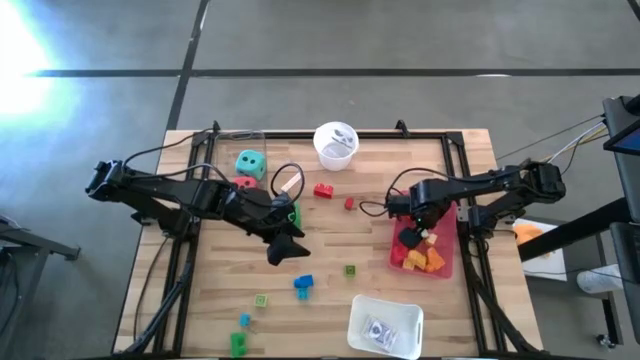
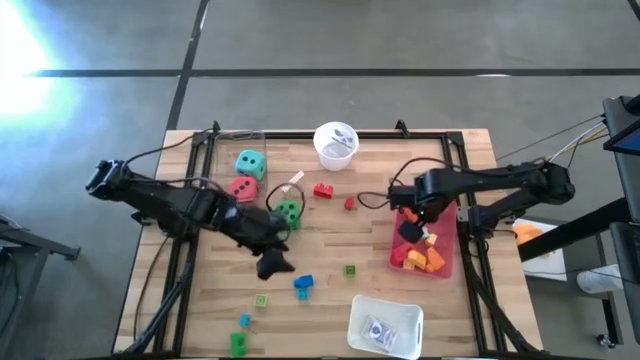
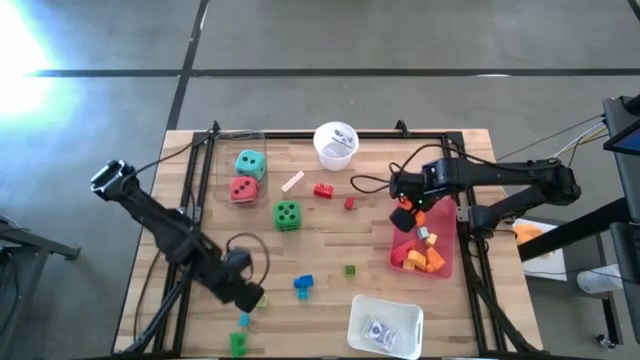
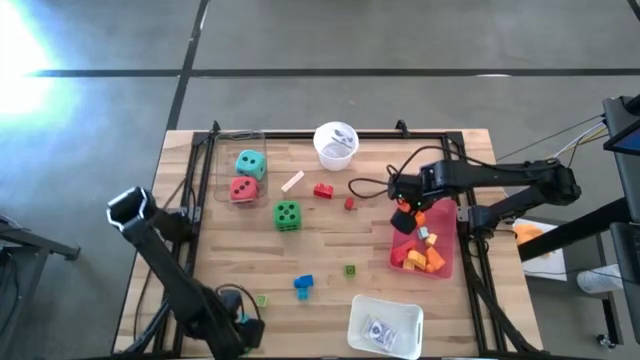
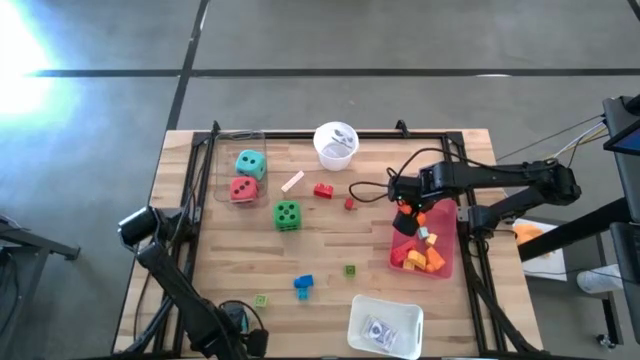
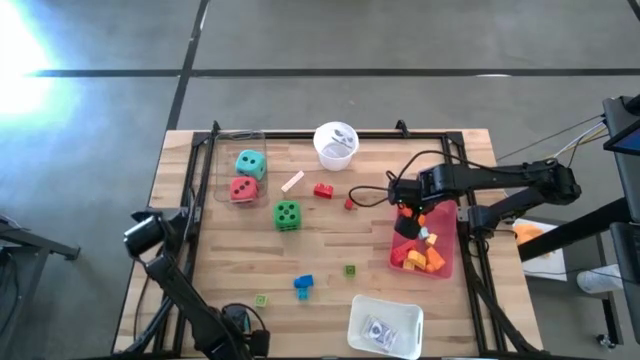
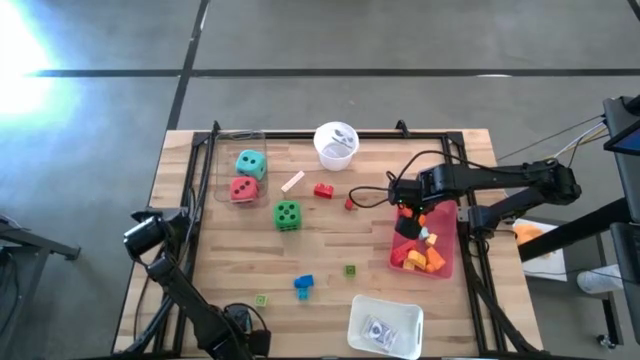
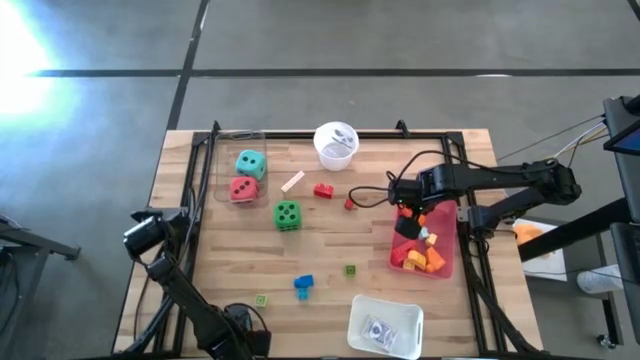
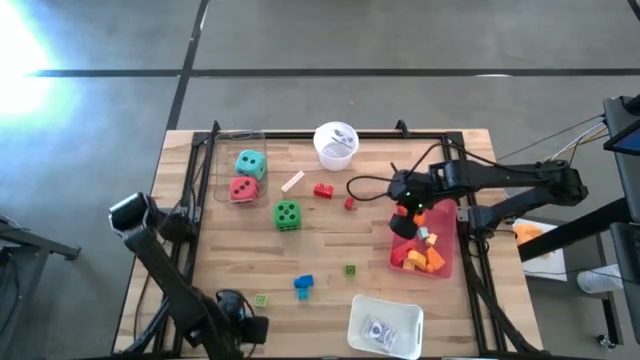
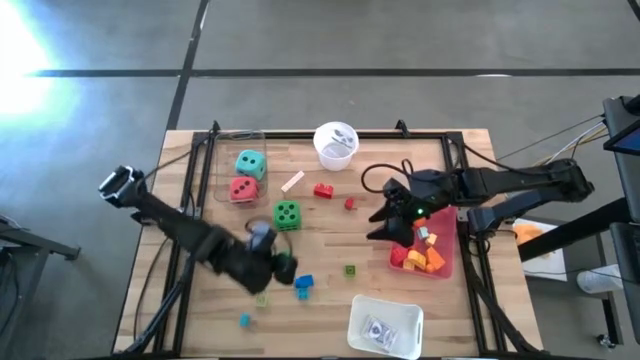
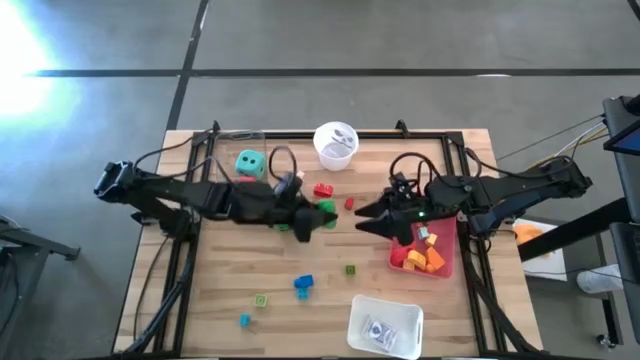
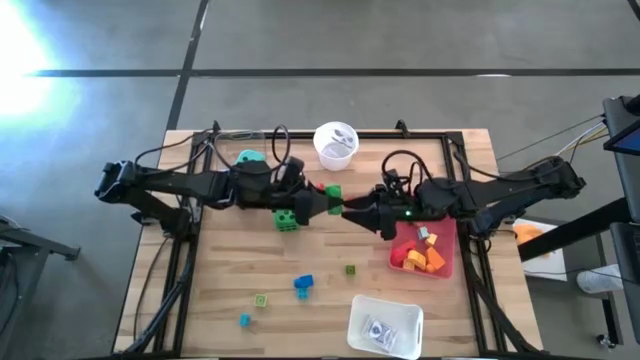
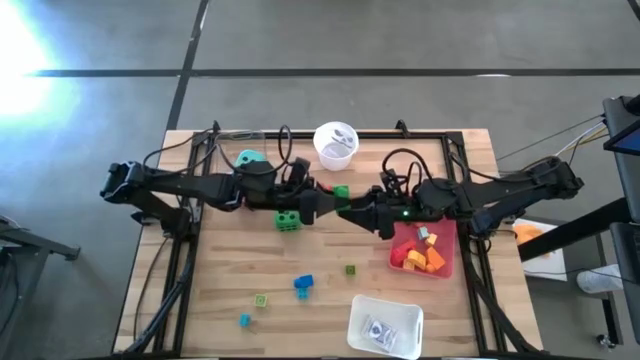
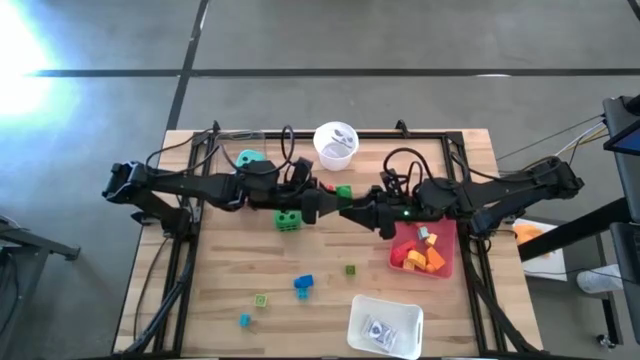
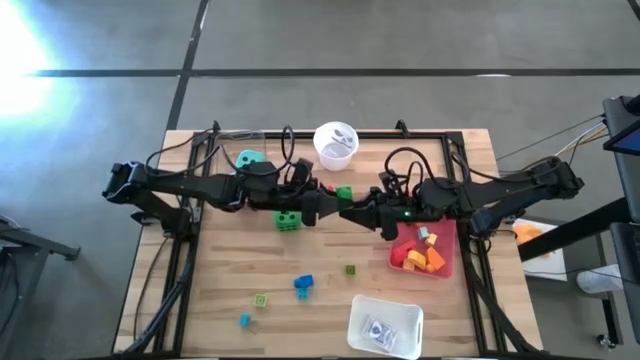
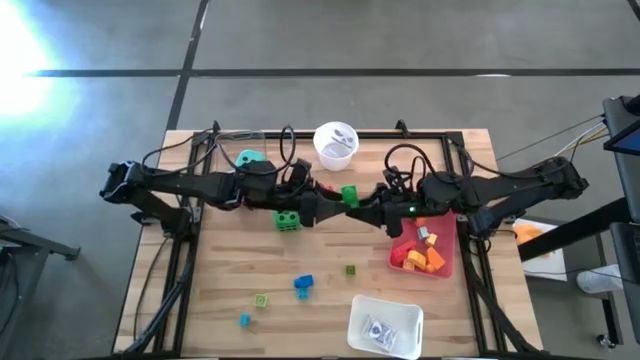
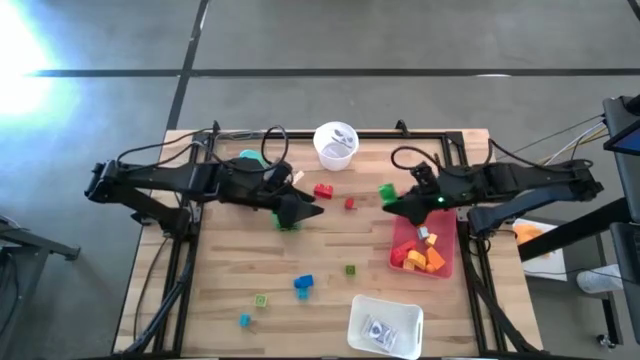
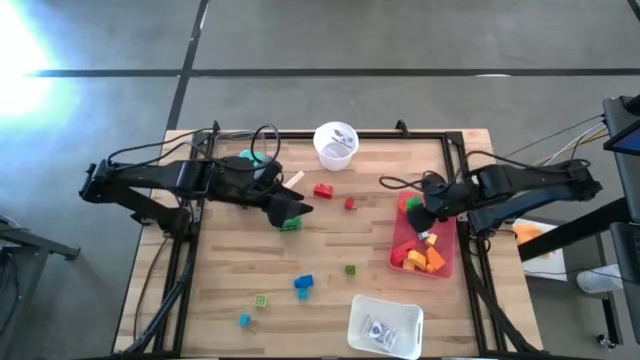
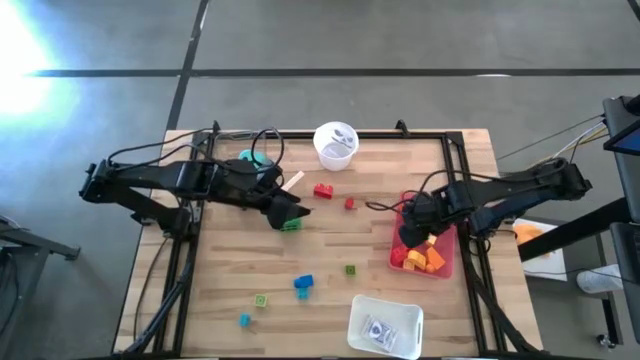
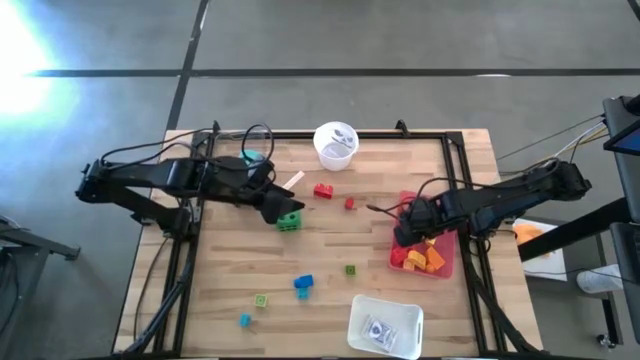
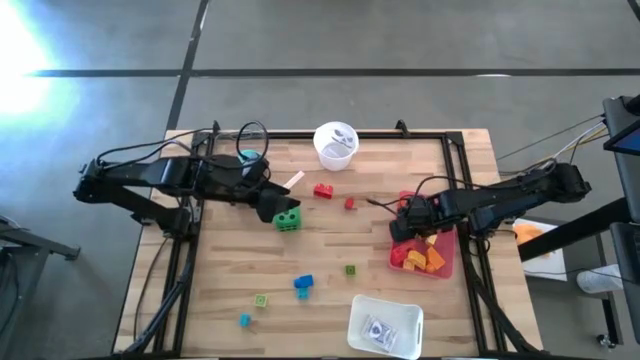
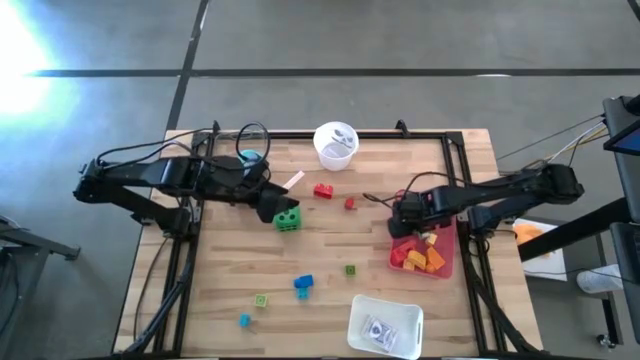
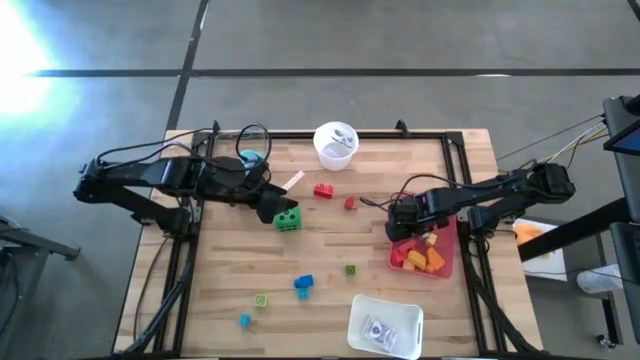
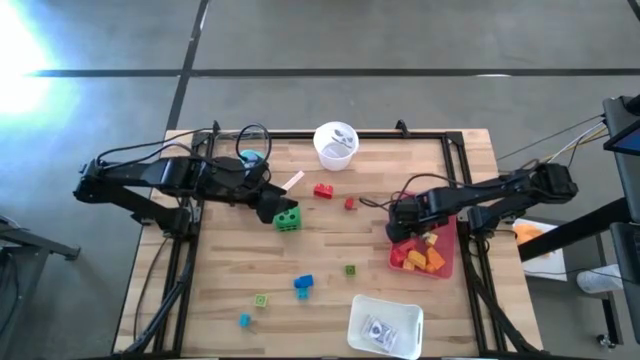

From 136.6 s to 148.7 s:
Task: Pick & Place Toys
Put the green game piece into the pink bin

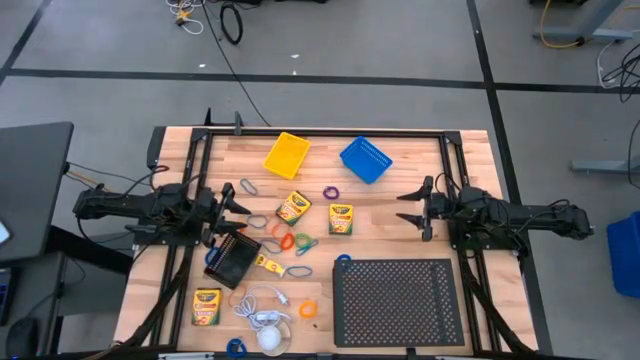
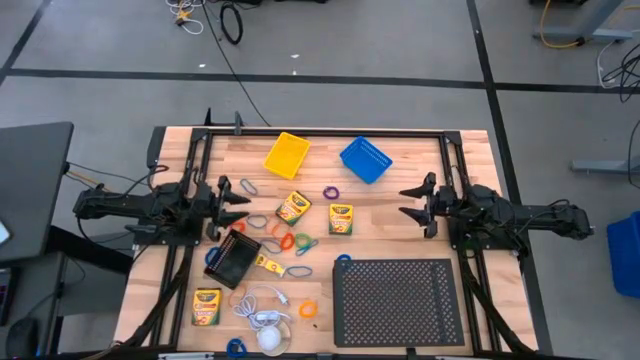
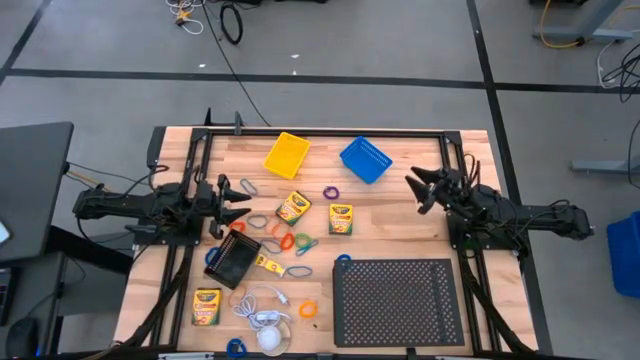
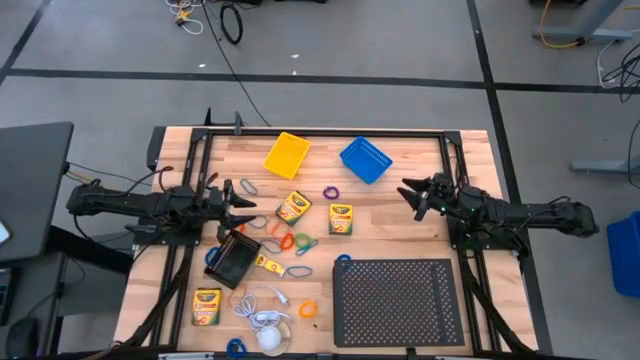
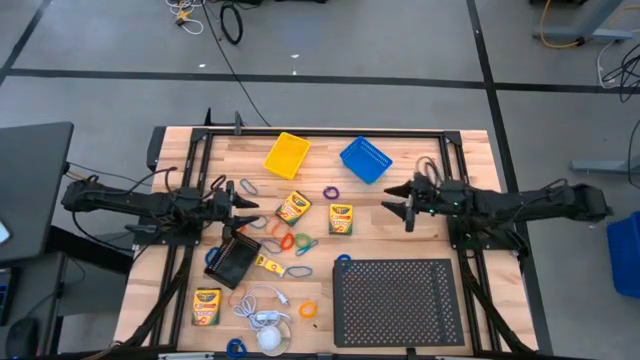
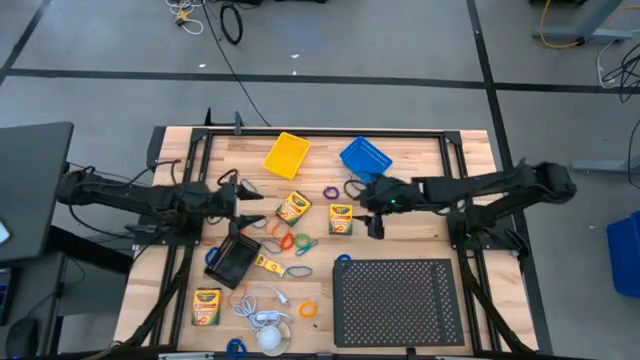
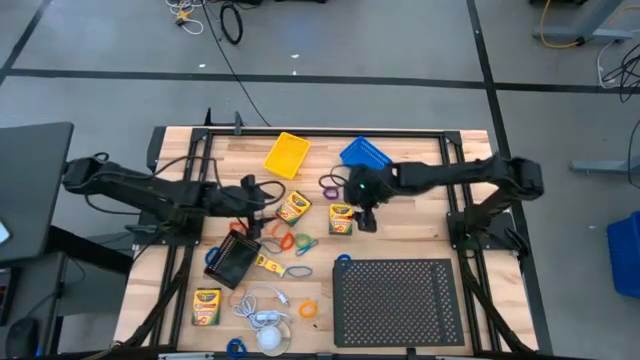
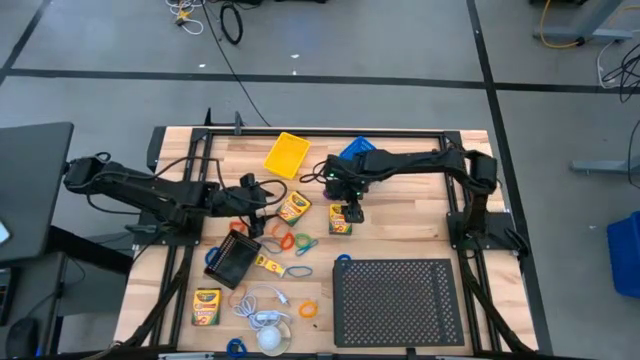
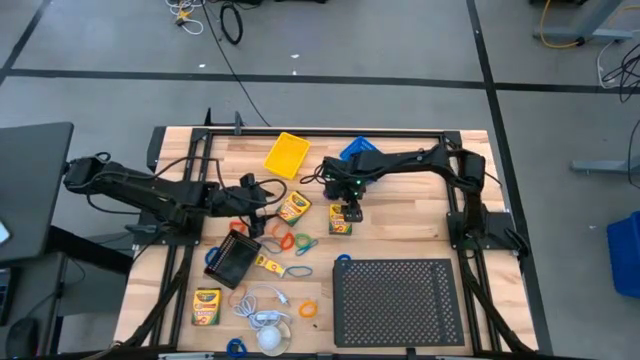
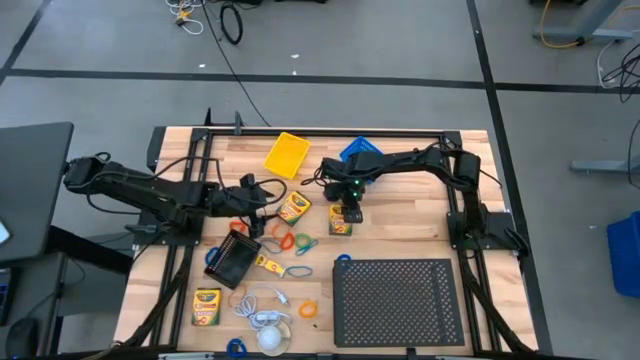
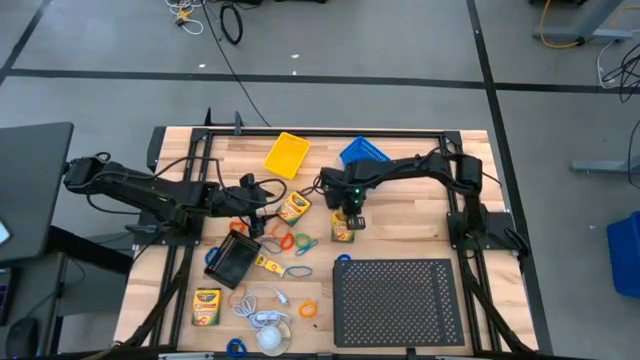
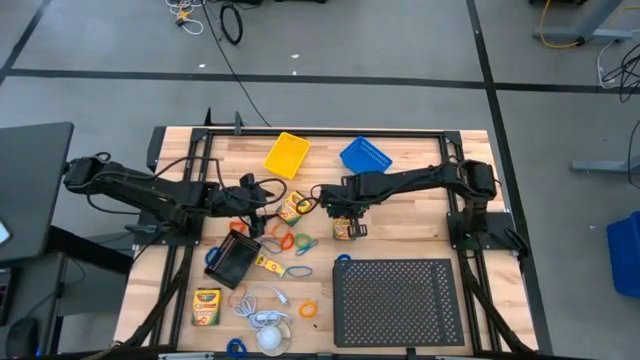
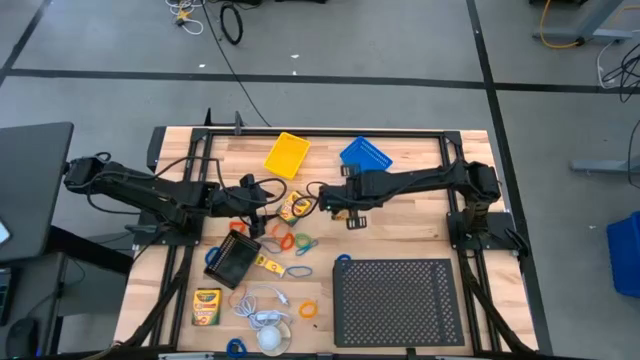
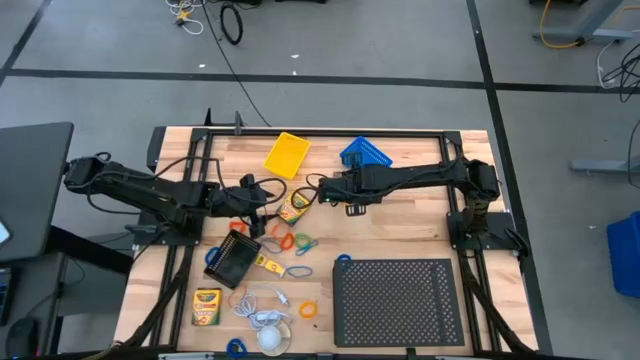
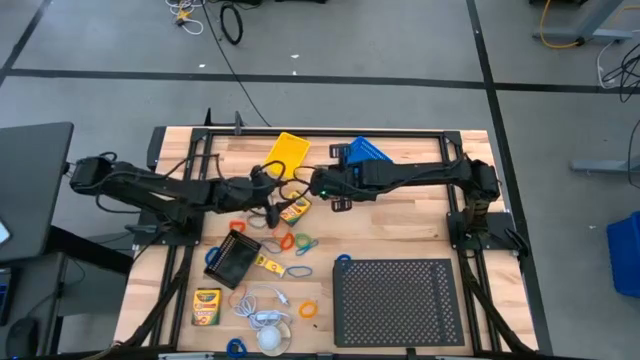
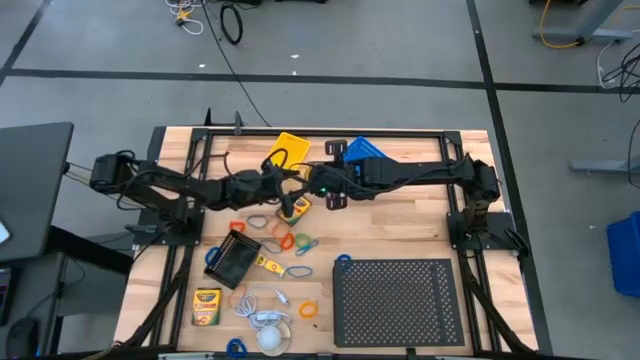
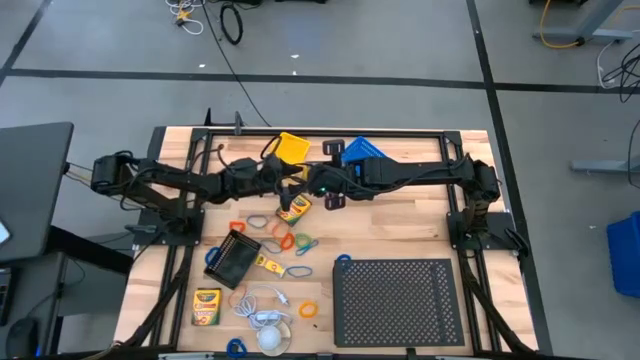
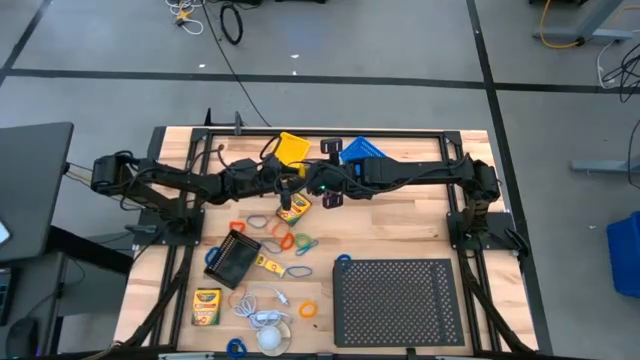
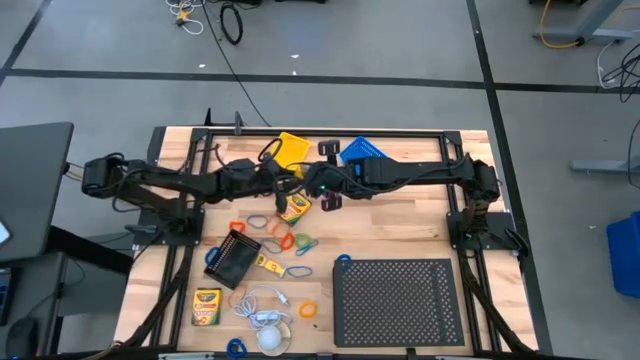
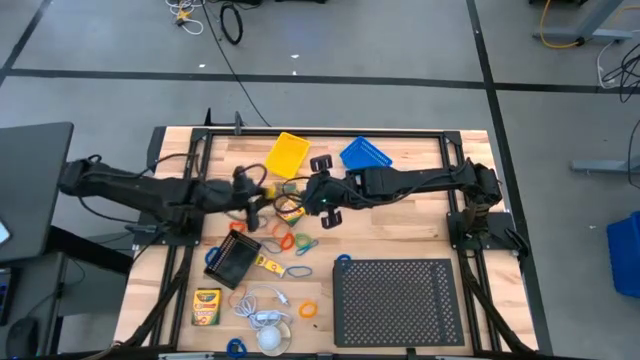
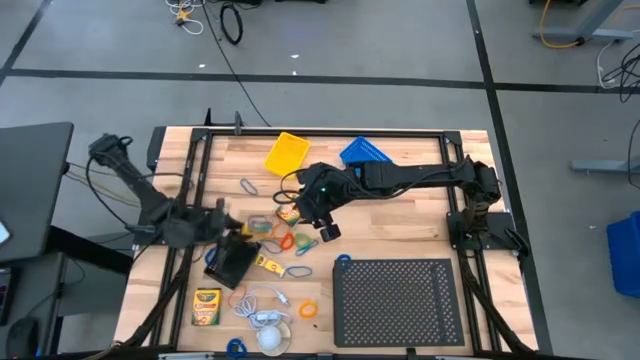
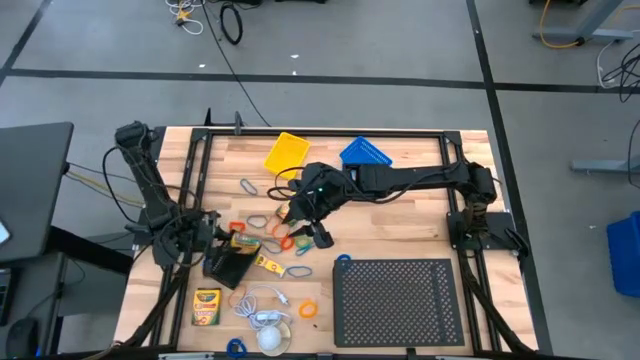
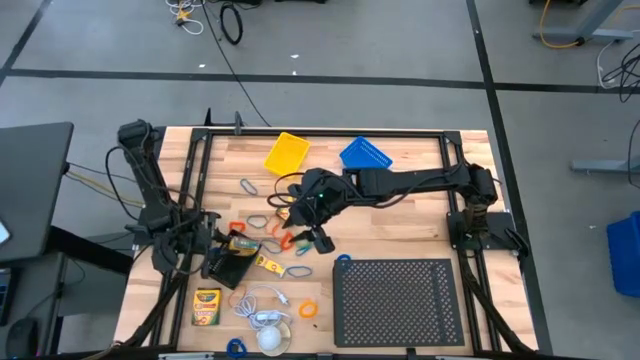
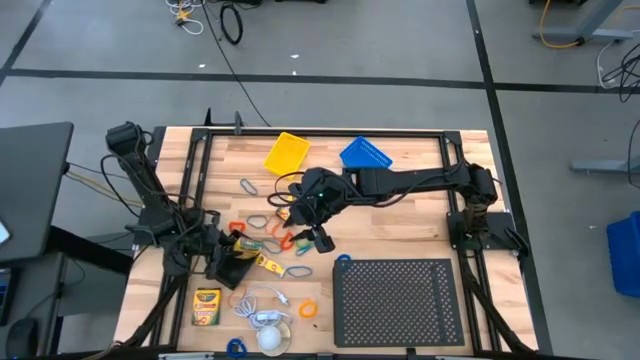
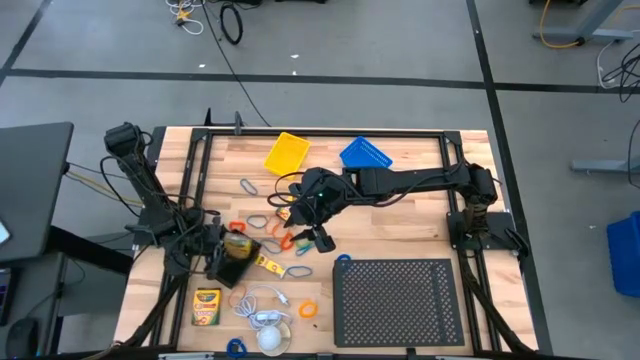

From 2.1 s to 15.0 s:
Task: Pick & Place Office Desk Supplies
Put the crayon box into the black basket
